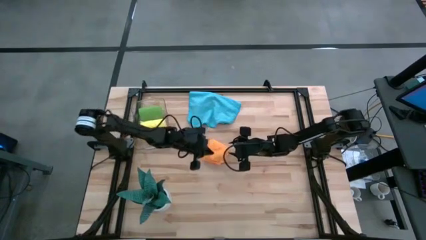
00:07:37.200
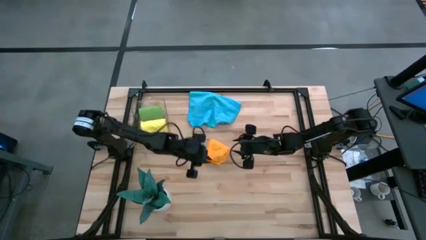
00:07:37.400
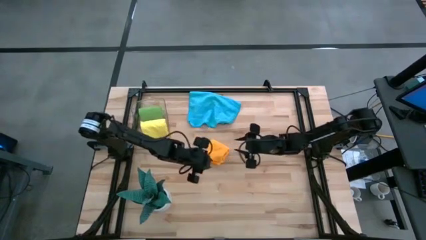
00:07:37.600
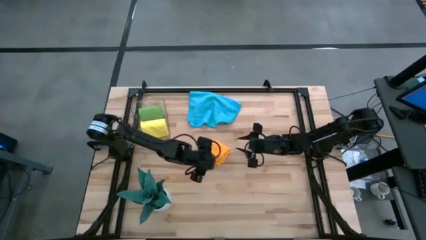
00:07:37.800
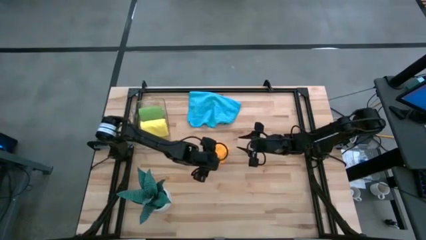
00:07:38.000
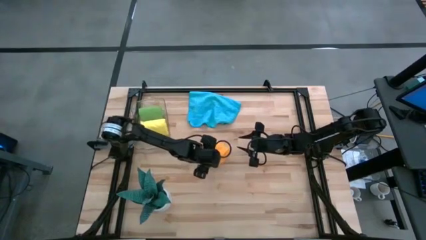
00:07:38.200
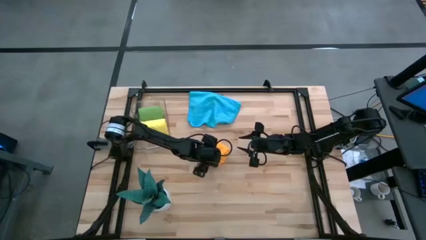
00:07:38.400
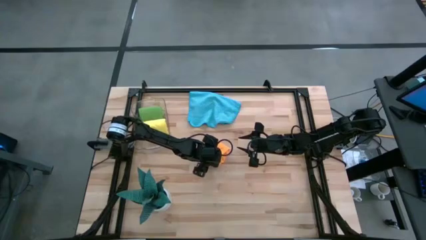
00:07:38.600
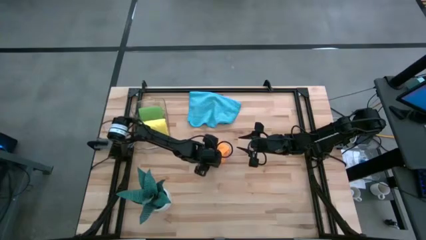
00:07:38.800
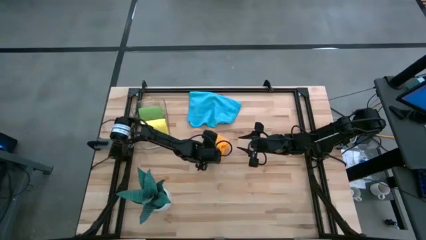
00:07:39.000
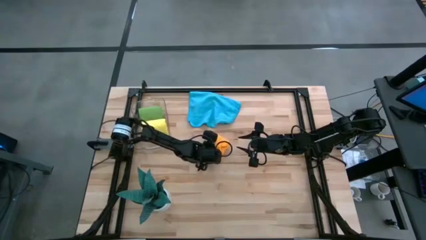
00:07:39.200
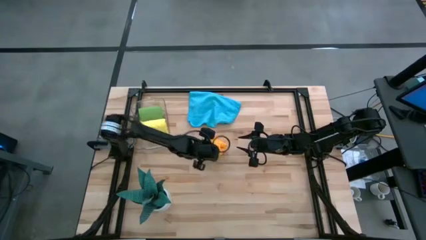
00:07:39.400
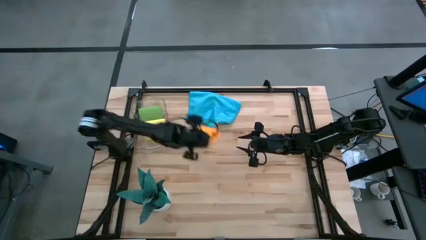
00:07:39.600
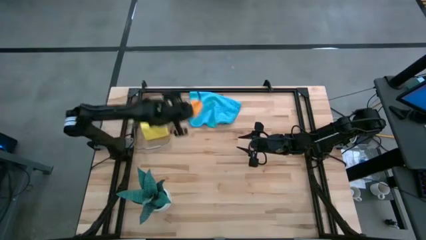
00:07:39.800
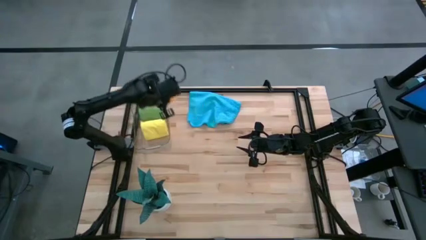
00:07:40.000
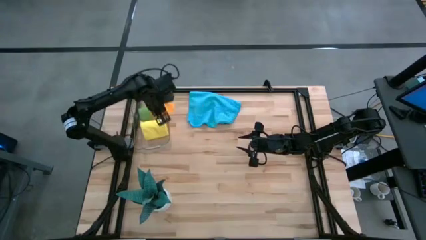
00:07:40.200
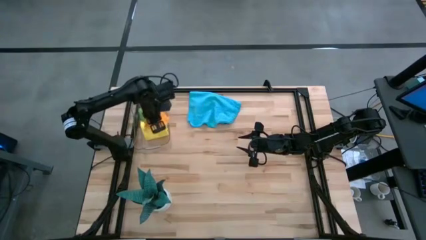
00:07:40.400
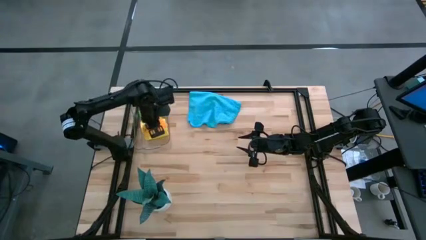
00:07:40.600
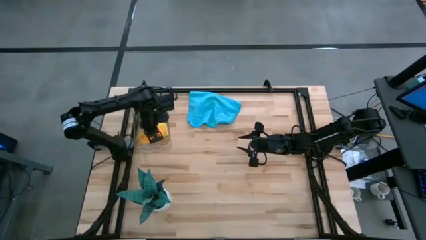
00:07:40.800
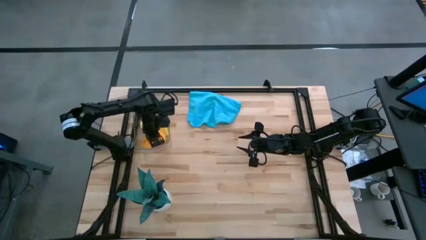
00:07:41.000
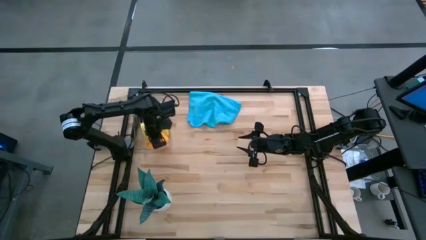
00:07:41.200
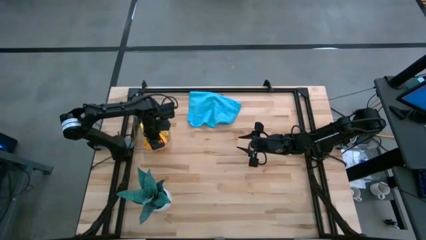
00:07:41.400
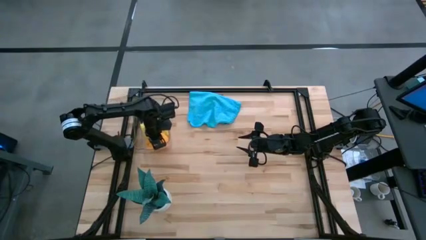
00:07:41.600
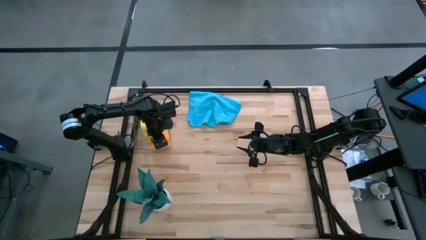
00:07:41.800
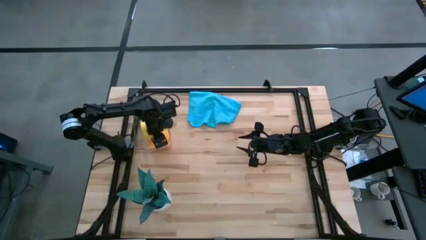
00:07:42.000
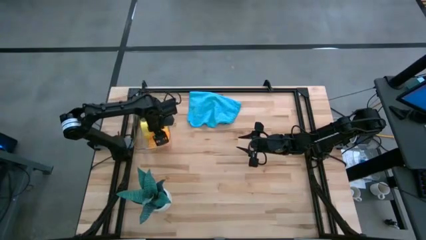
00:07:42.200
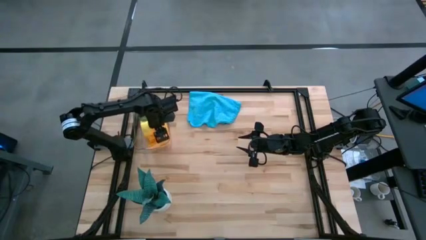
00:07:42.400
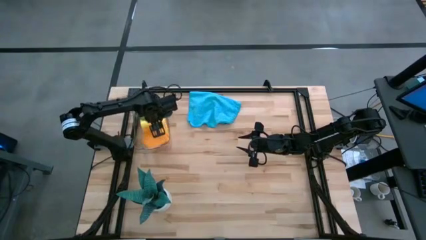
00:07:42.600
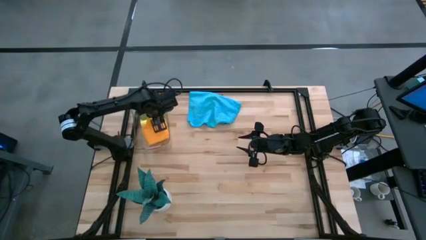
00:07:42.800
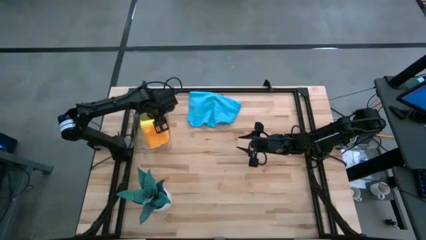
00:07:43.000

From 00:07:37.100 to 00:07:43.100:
Task: Roll microfiber towels into tight, uniform cylinder then place into a basket
Put the rolled orange microfiber towel into the transparent bin

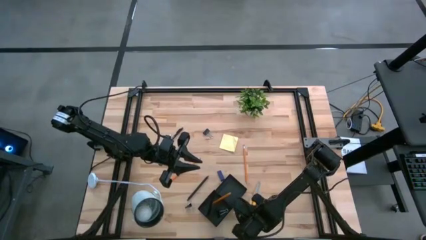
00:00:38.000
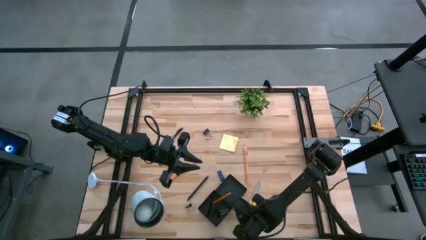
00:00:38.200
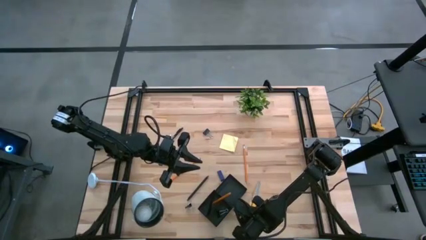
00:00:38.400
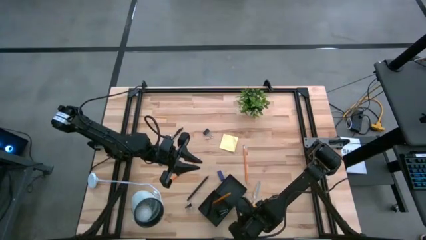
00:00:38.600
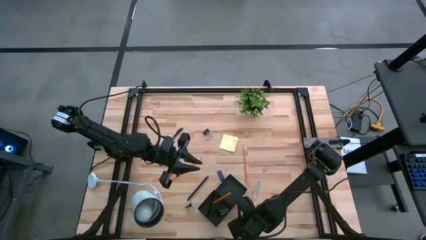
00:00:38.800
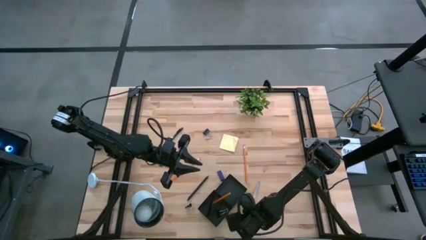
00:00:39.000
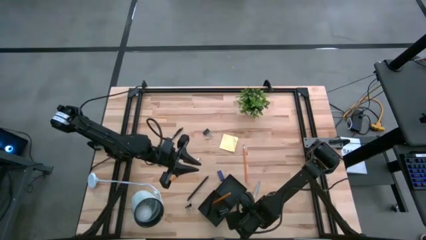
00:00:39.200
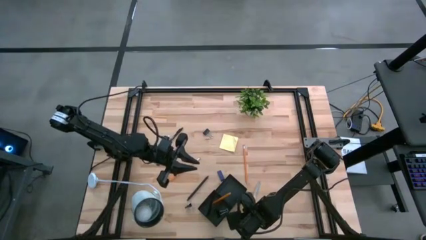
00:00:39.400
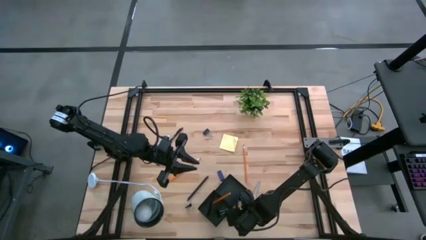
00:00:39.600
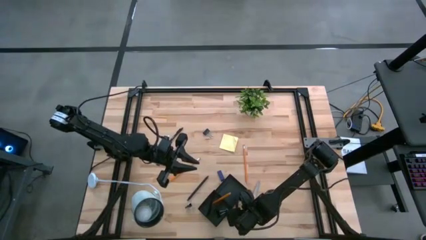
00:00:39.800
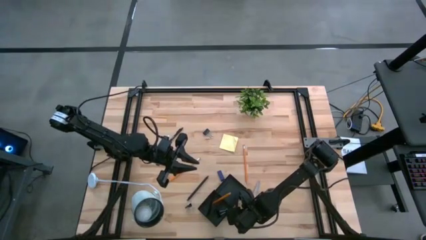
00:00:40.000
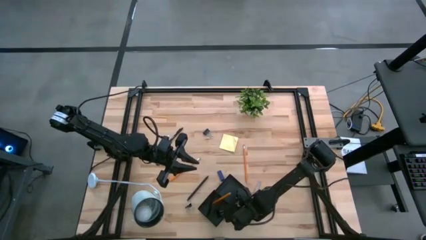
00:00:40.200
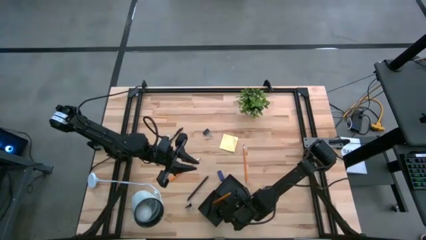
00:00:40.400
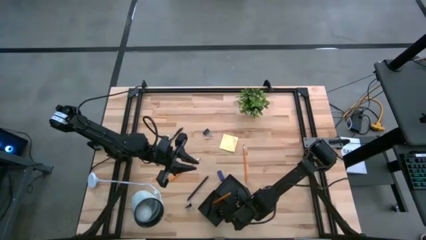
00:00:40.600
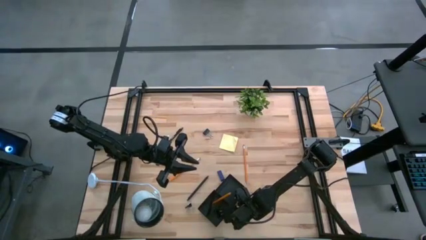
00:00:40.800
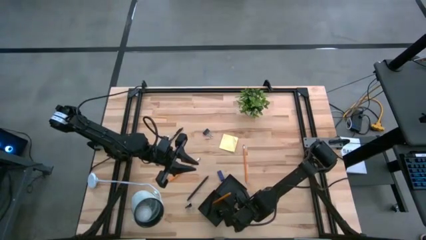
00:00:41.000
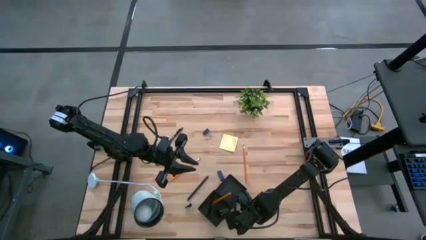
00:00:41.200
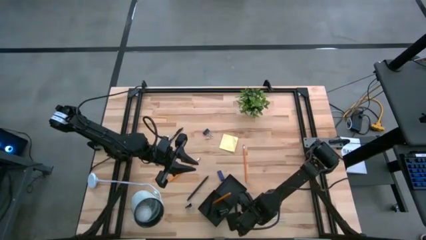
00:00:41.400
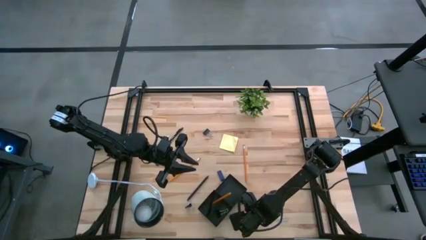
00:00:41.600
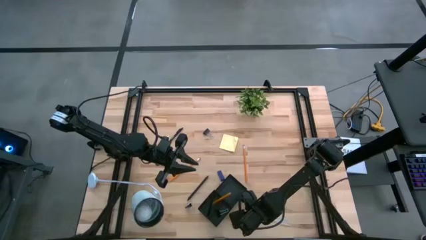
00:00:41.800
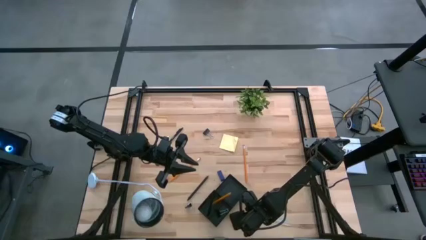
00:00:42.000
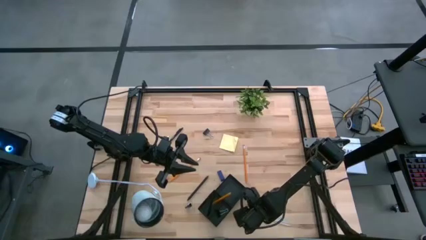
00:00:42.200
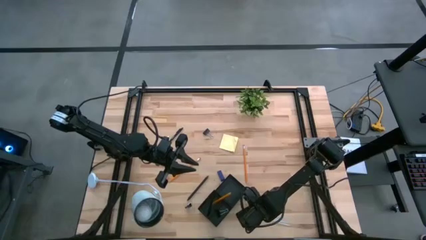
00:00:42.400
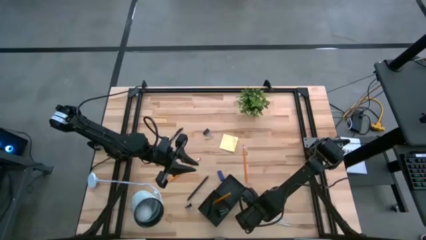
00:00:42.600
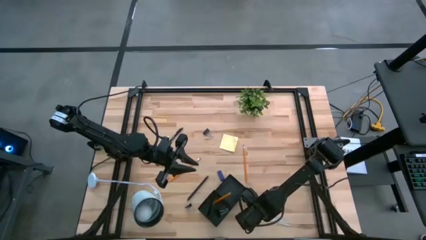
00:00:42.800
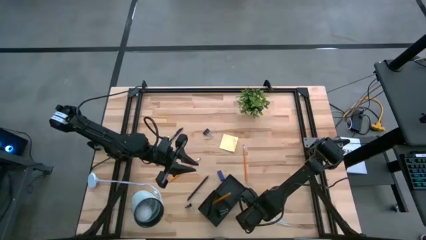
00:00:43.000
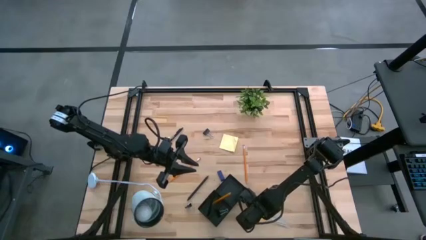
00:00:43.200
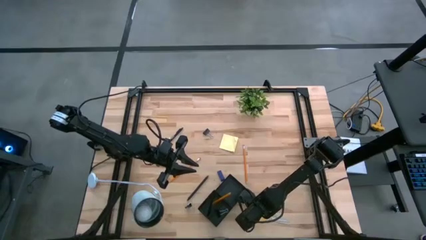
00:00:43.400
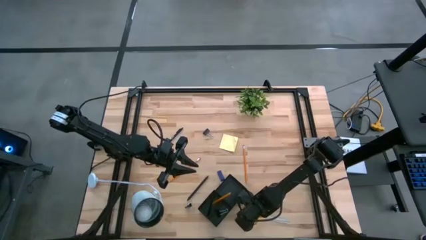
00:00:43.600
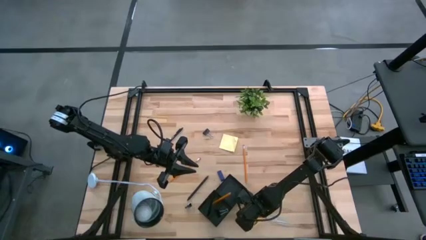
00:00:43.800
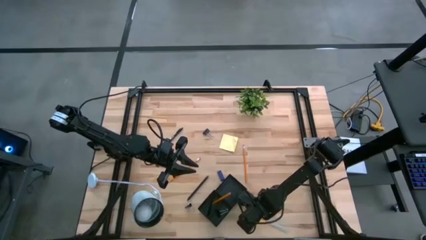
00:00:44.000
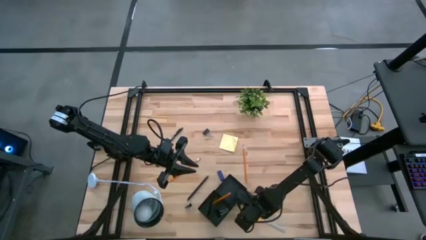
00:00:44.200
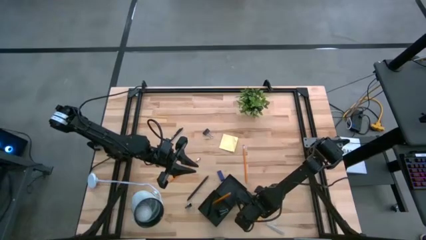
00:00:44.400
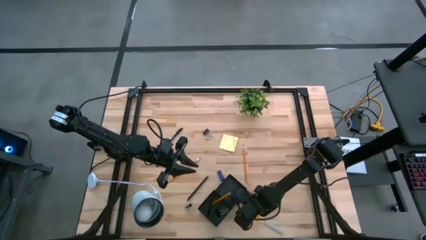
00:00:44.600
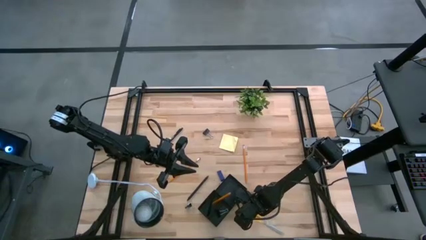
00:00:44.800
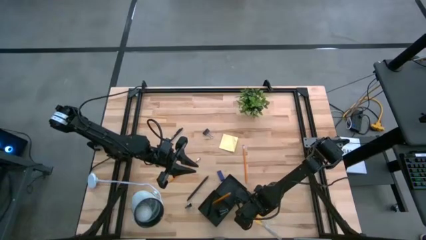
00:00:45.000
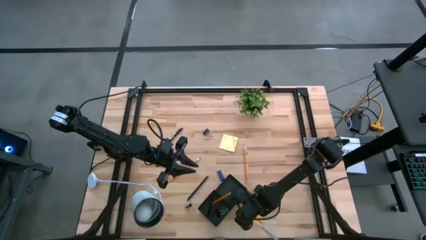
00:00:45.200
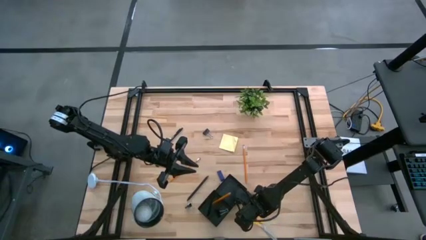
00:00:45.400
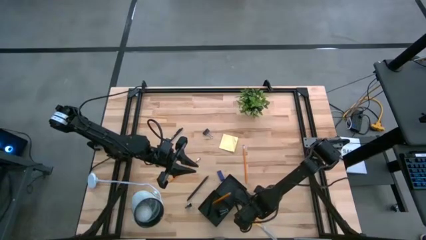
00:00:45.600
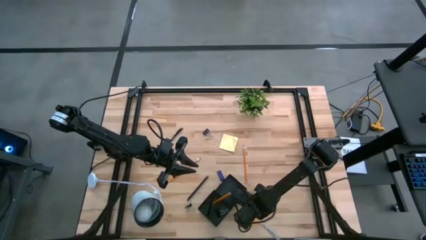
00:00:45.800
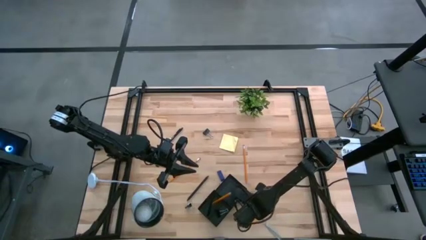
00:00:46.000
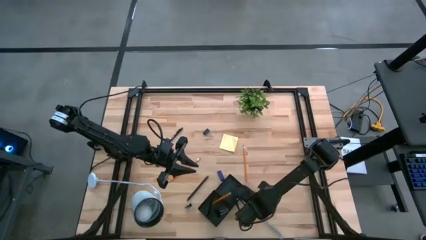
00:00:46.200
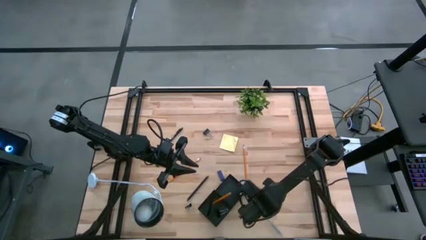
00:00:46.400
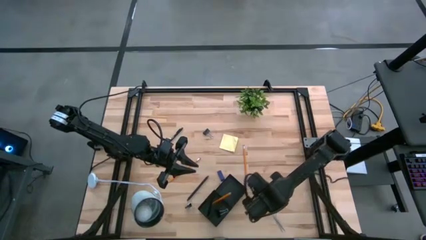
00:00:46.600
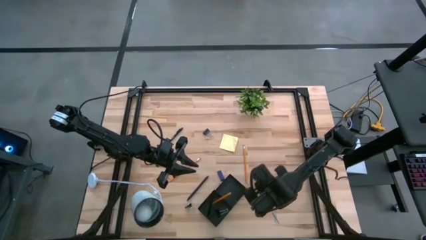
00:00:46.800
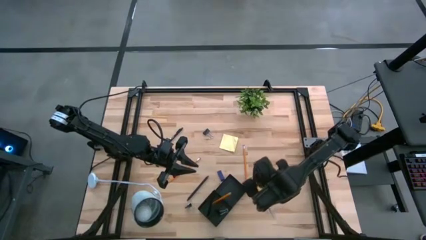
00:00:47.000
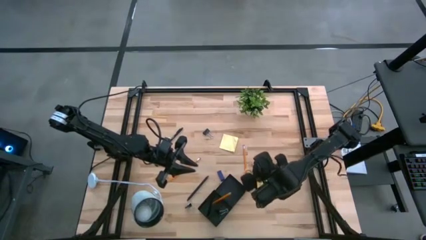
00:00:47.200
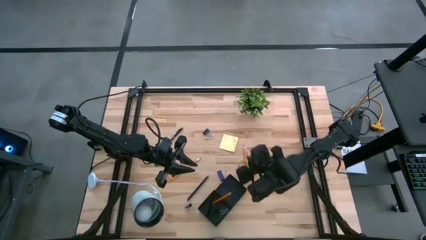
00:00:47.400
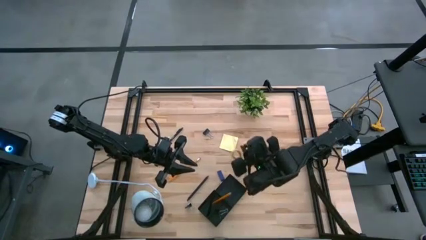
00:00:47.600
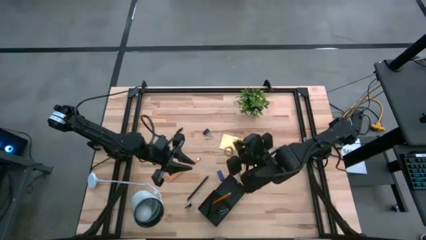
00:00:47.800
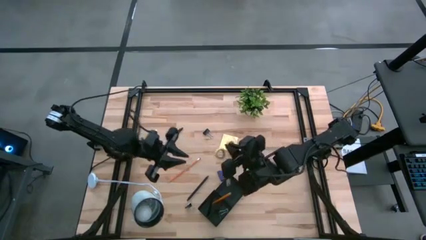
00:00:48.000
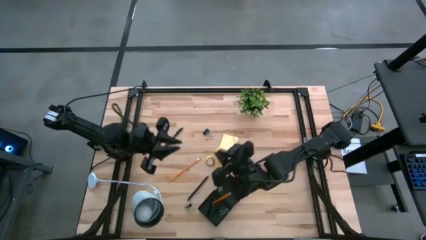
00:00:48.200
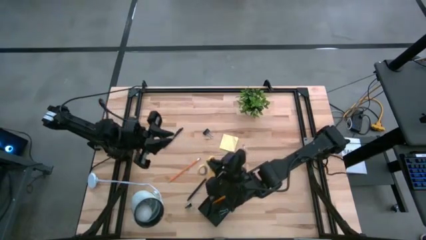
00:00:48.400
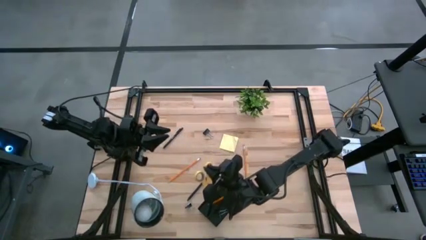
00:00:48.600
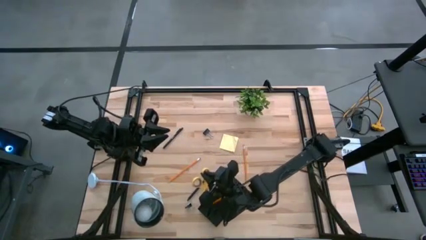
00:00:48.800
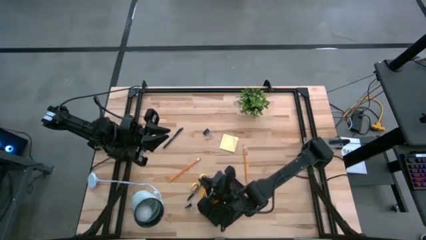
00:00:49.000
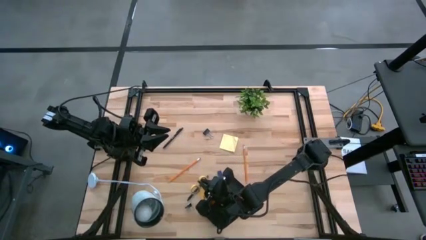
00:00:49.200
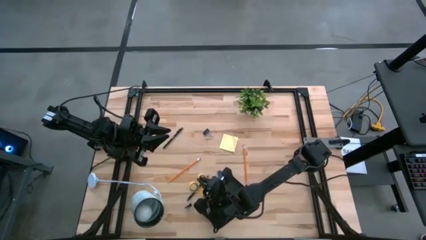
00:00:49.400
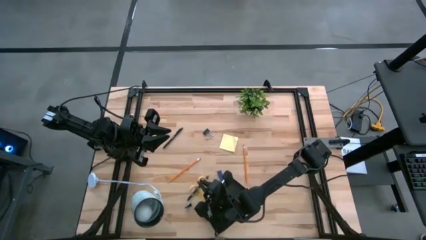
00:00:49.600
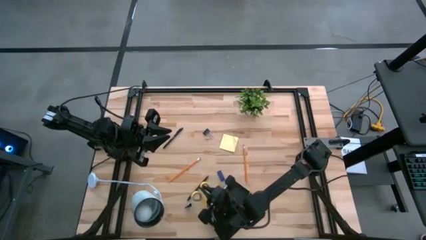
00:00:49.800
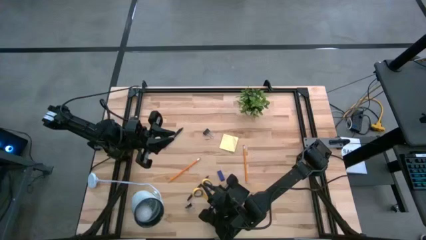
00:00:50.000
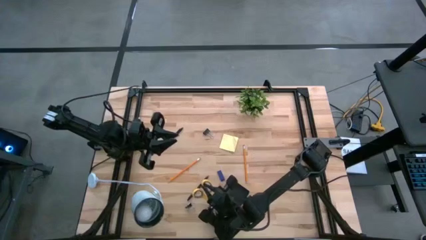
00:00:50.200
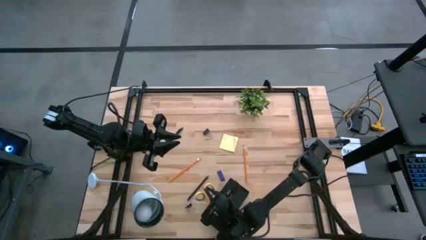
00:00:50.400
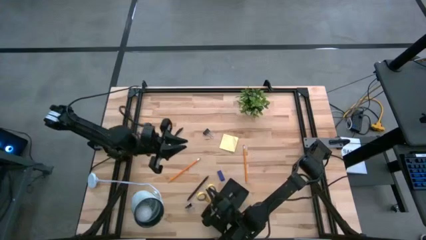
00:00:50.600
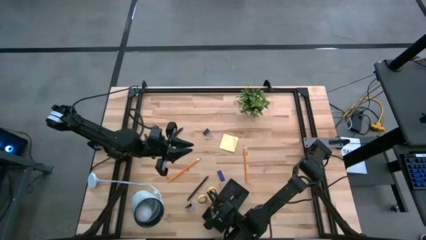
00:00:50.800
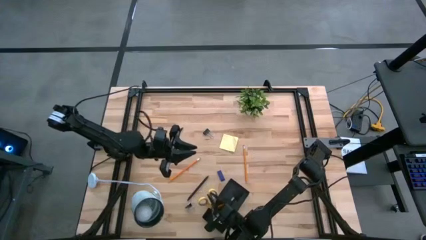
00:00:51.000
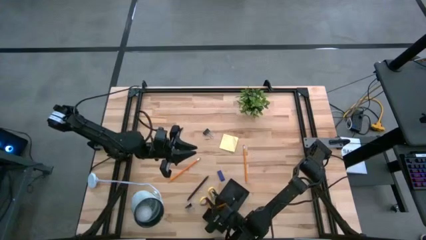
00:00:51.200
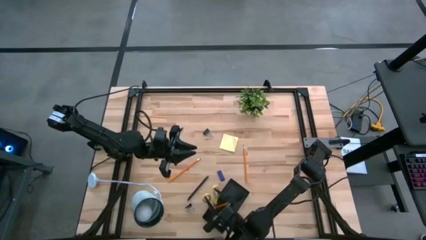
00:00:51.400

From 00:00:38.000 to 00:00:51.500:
Task: Pick and place office supplies into organizer
Put the scissors into the desk organizer
